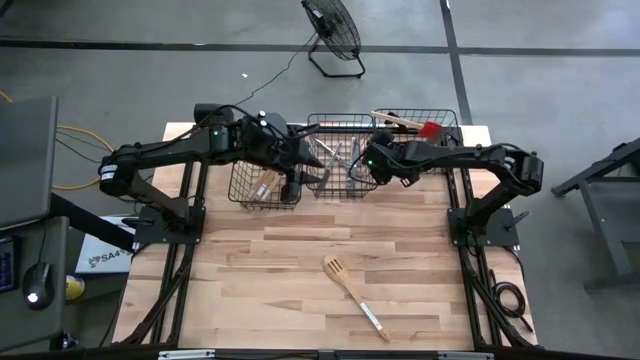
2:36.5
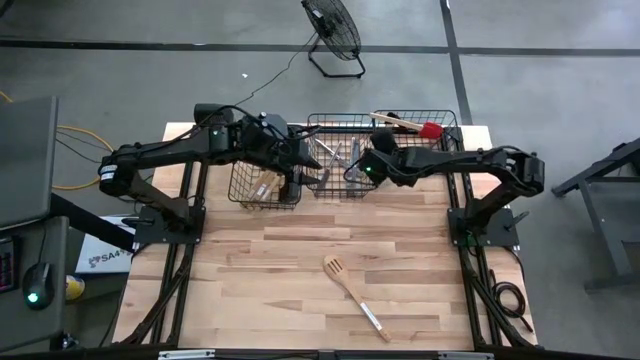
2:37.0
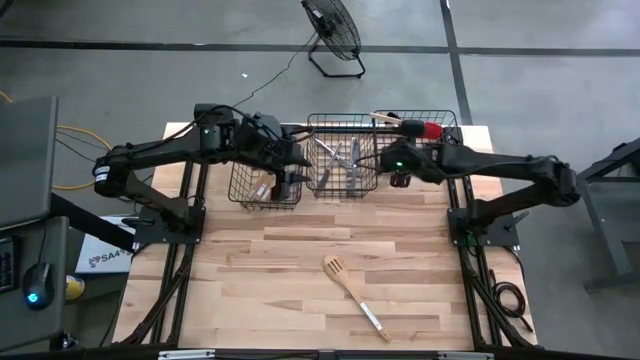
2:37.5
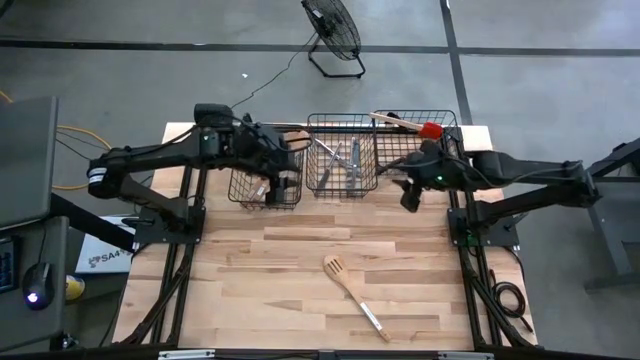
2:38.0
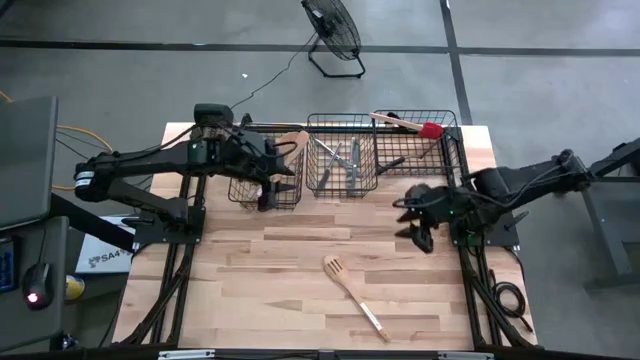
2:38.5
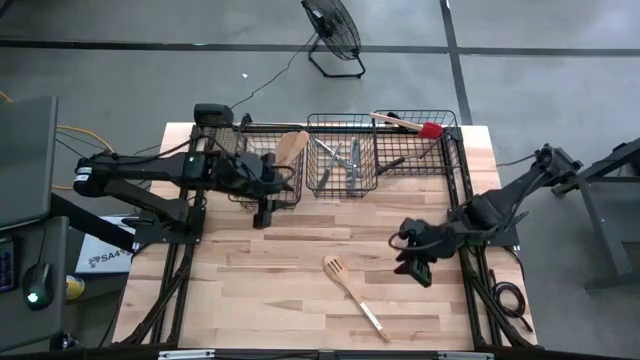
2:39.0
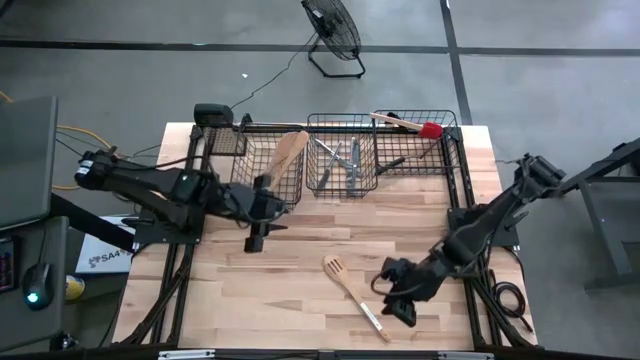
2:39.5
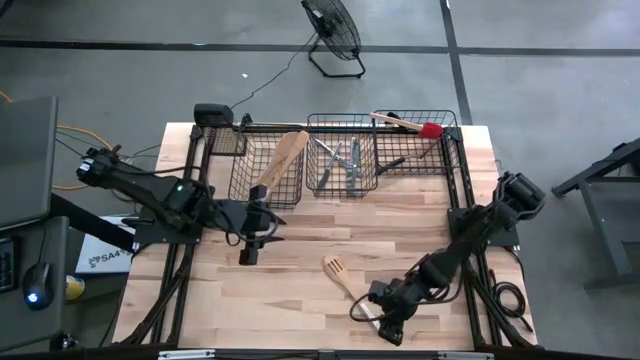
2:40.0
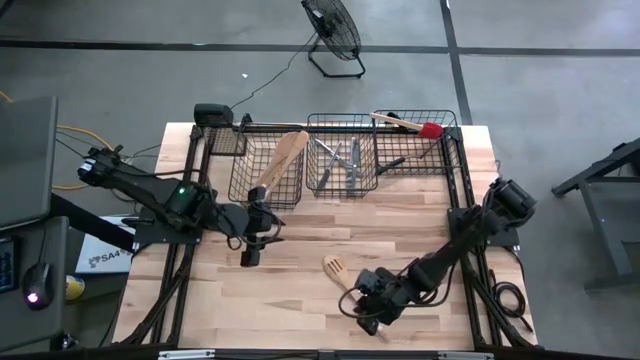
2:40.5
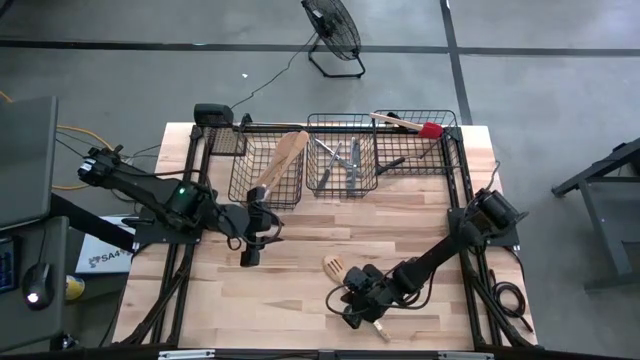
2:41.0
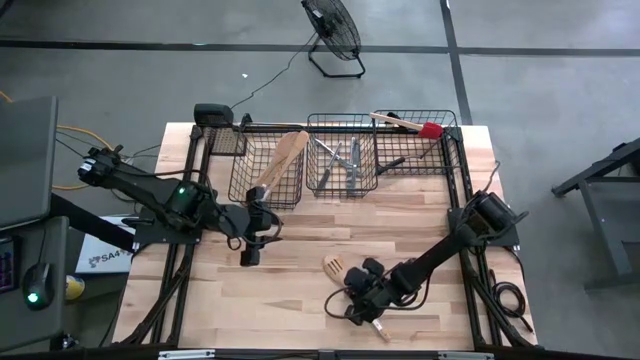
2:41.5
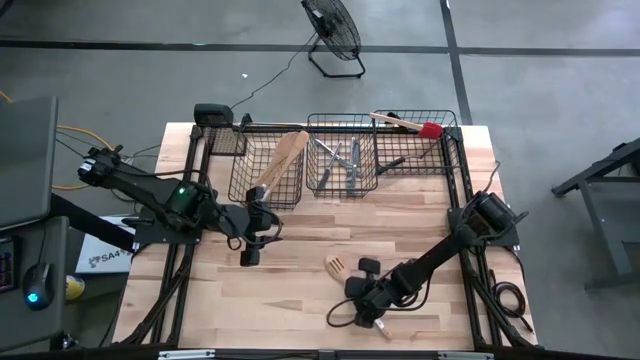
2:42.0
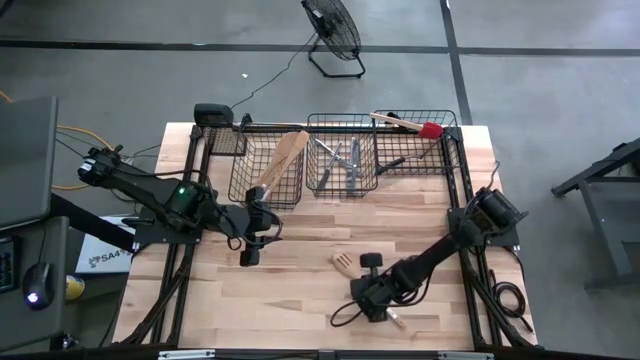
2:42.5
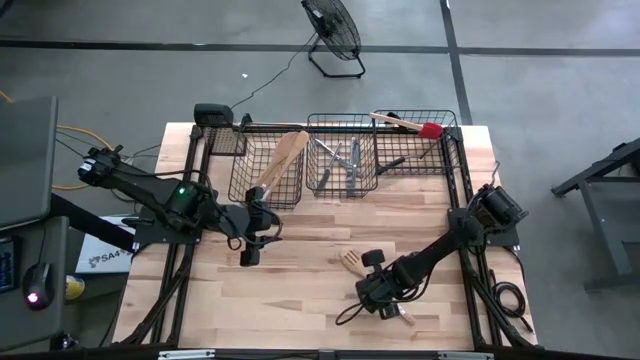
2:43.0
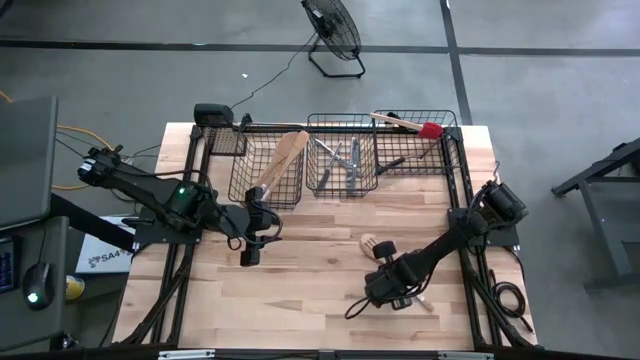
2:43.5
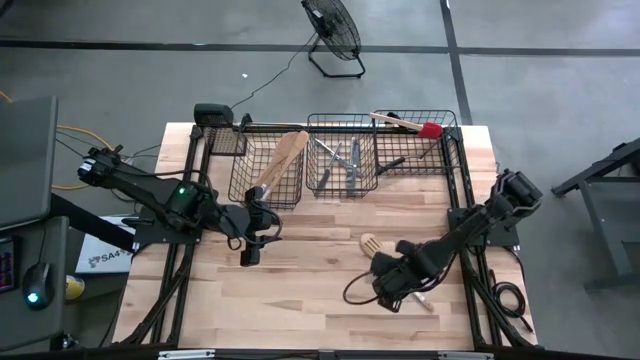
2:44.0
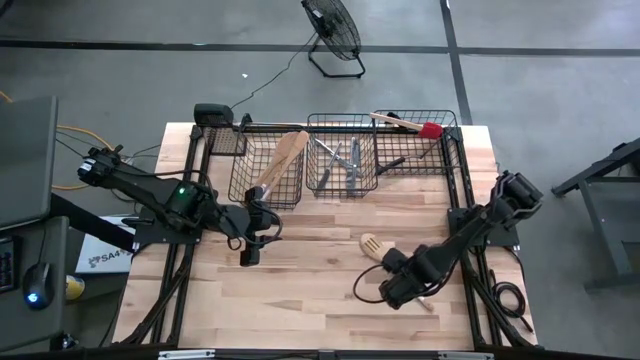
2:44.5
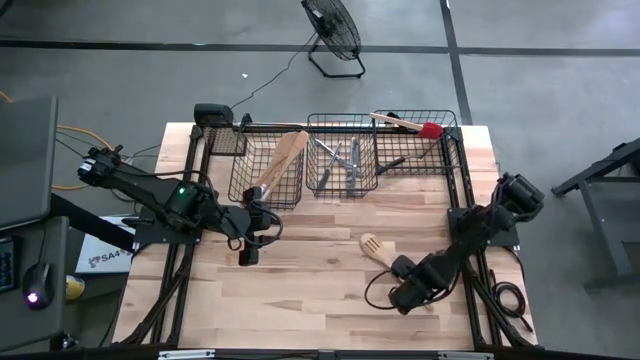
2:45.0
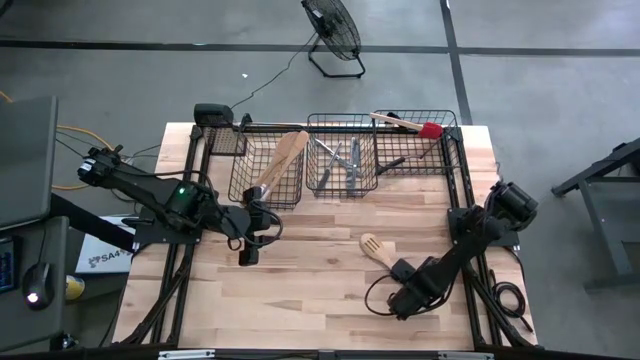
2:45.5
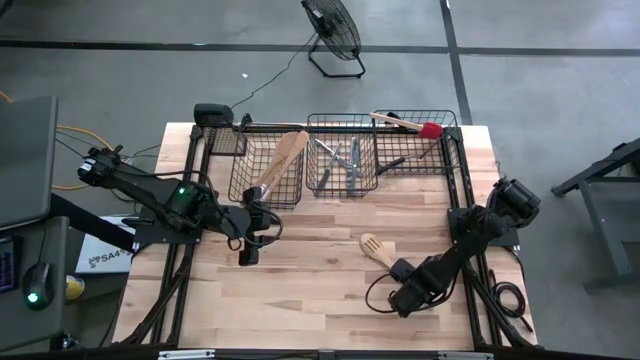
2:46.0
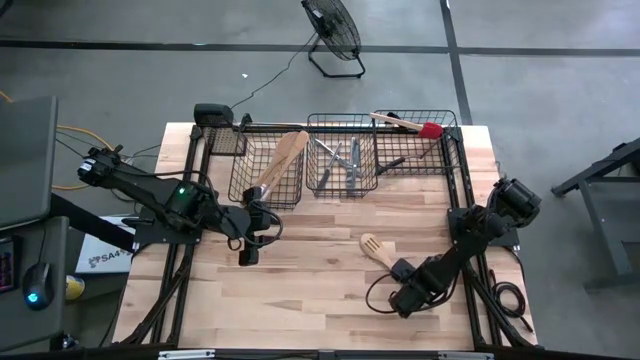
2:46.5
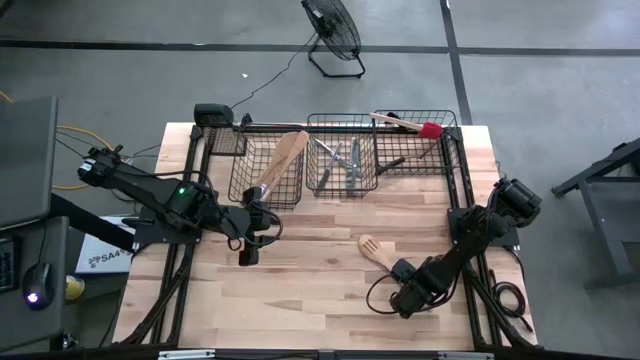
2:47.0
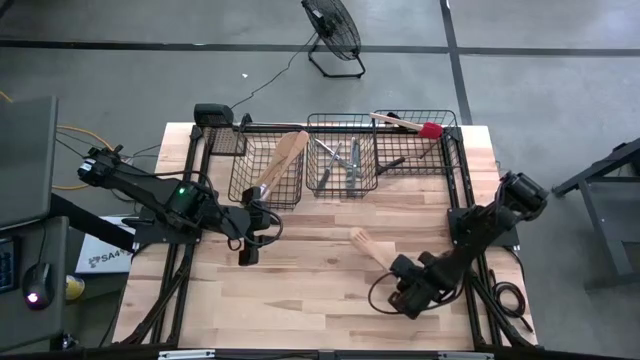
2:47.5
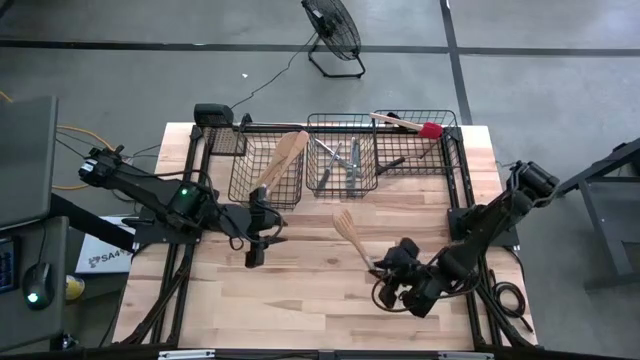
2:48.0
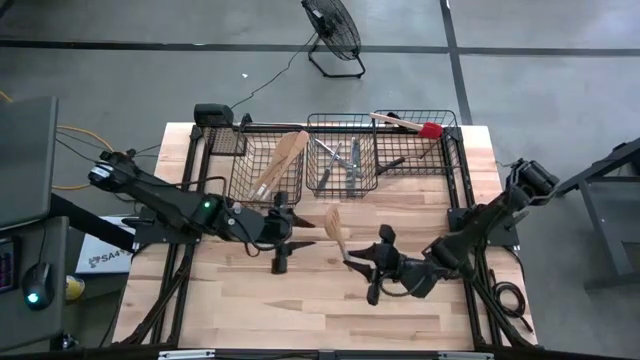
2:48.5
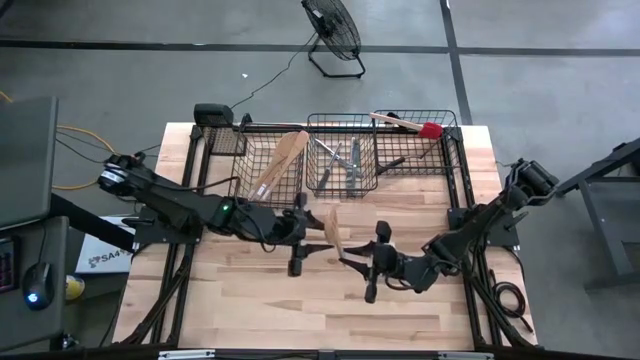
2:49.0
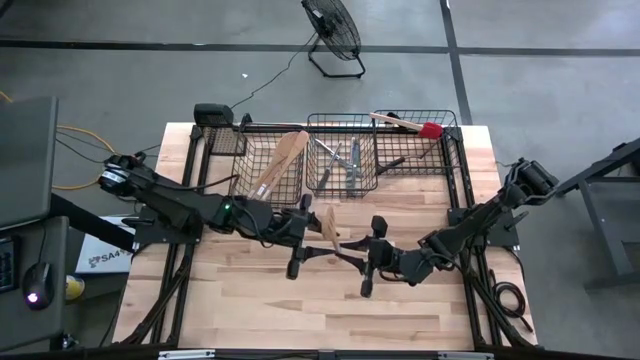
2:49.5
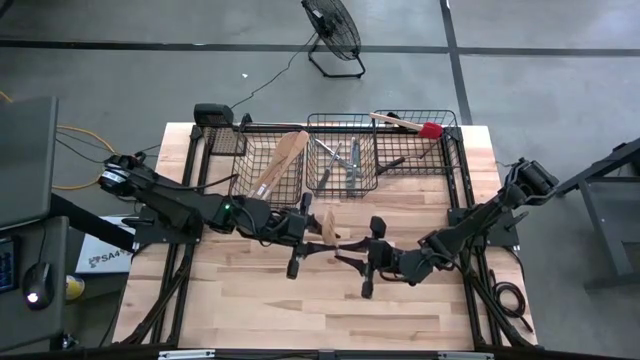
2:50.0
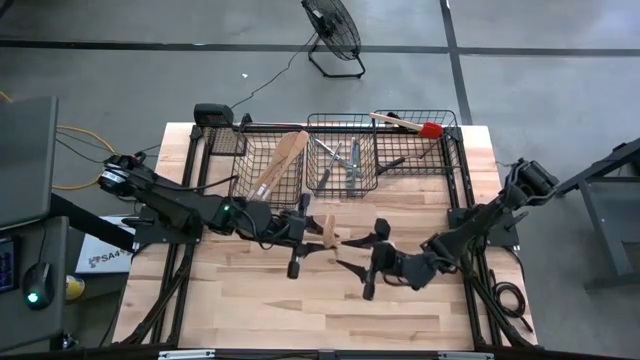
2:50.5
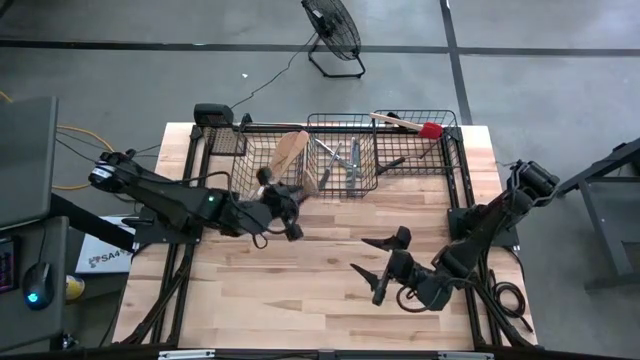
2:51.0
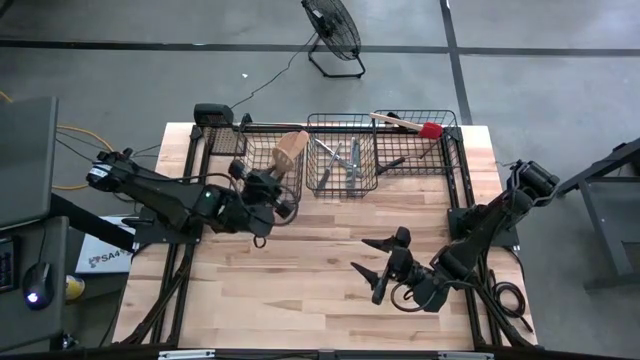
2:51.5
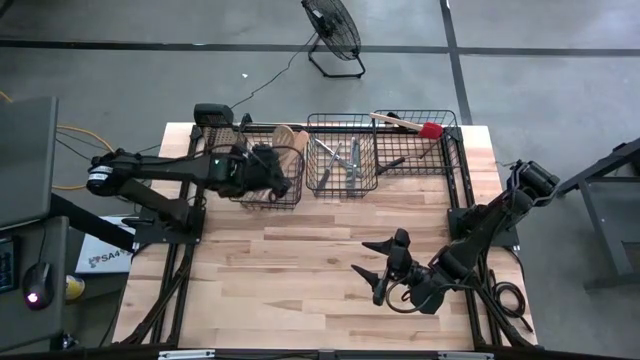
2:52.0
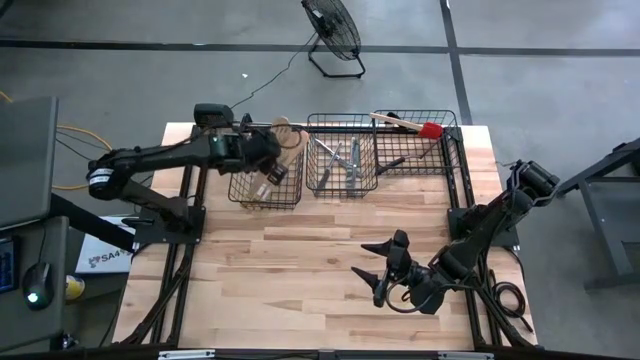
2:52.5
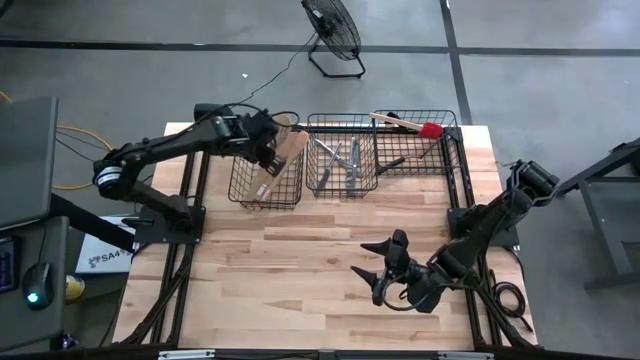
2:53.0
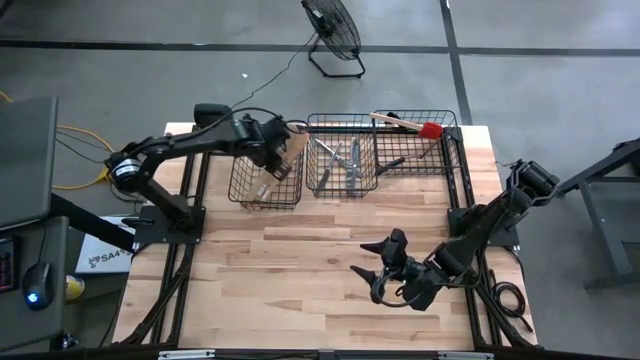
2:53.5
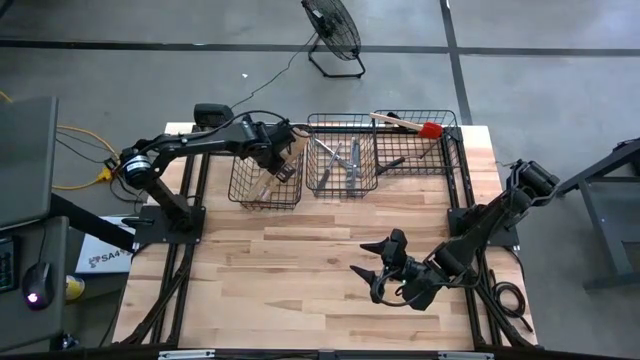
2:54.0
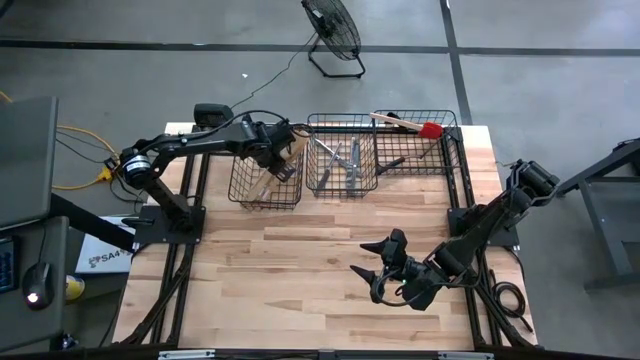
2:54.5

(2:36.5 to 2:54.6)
Task: Pick & Place Kitchen Items
Put the wooden serving spoon into the left wire basket

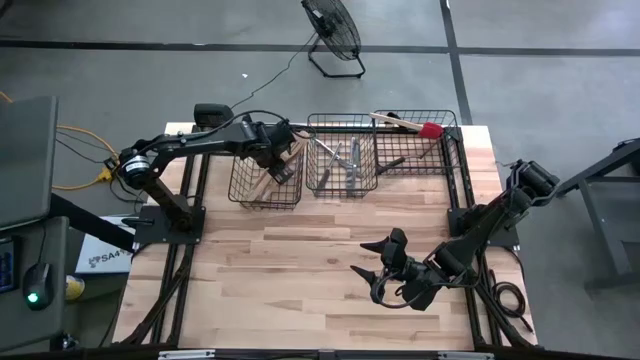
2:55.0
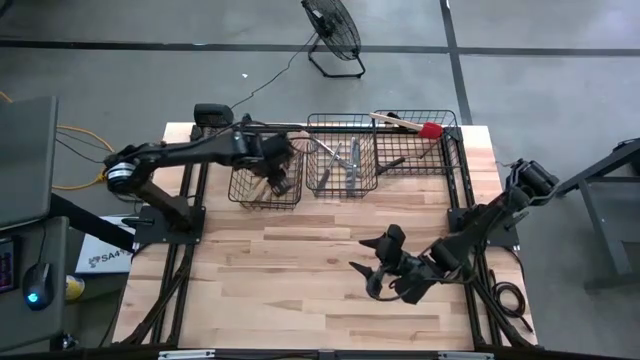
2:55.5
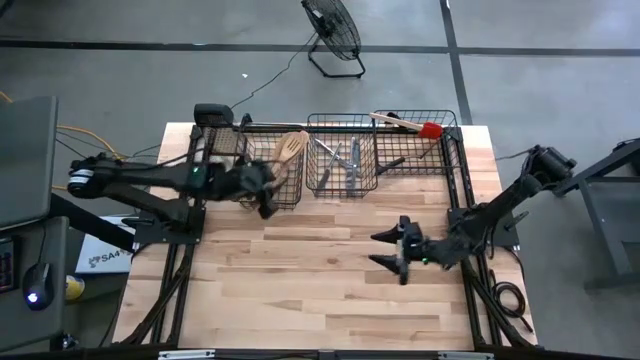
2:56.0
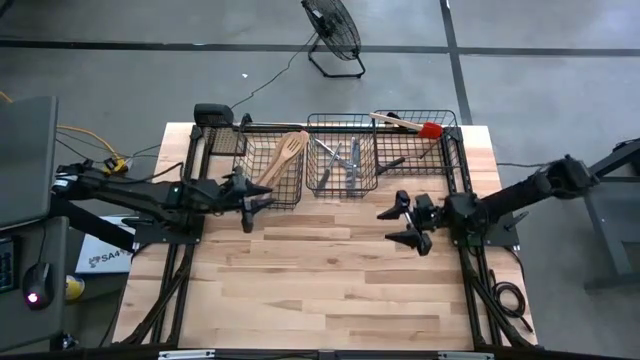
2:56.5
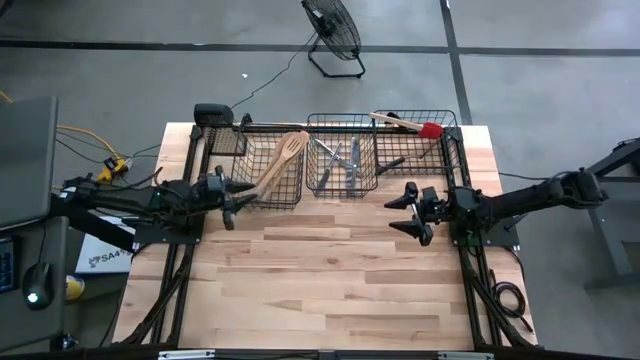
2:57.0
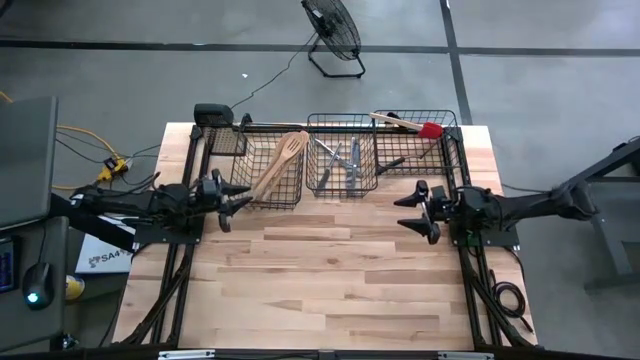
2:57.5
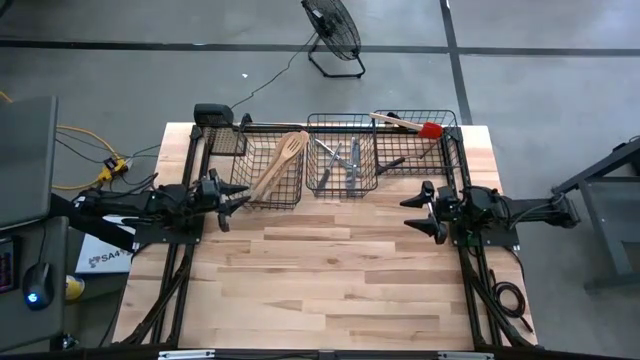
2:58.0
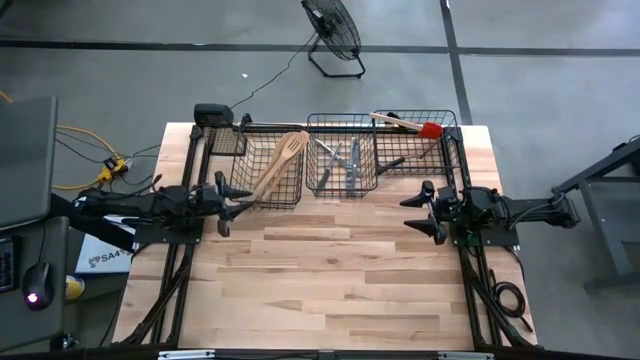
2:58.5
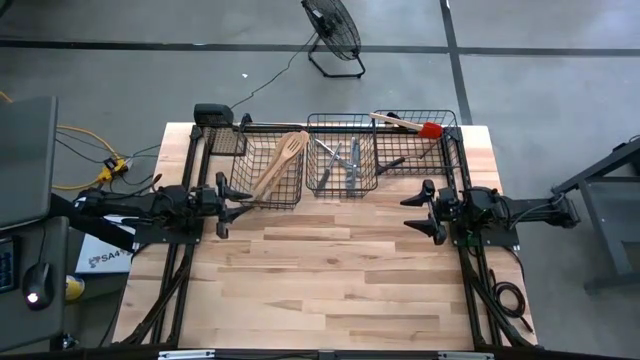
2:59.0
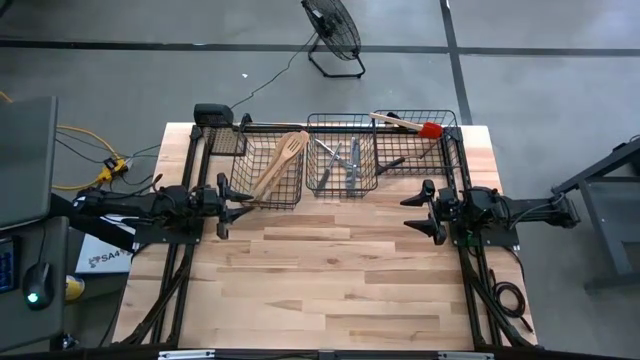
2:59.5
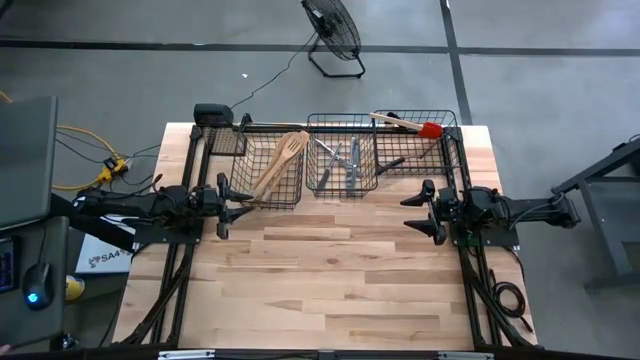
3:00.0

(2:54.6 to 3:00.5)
Return to Home Position
